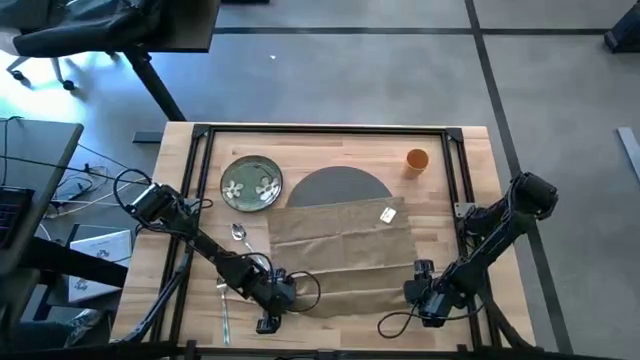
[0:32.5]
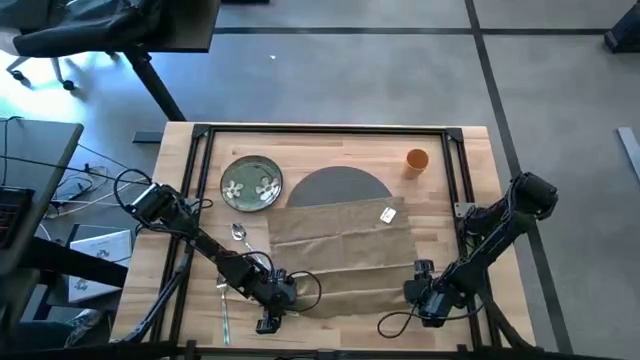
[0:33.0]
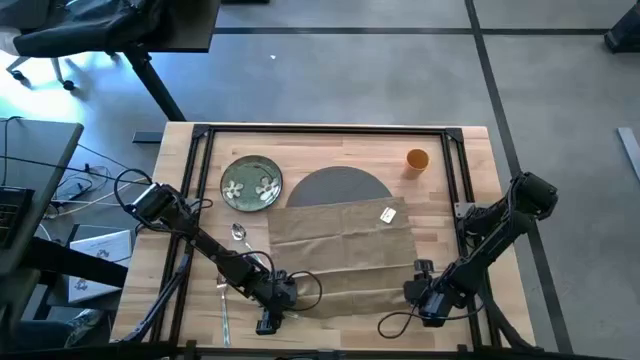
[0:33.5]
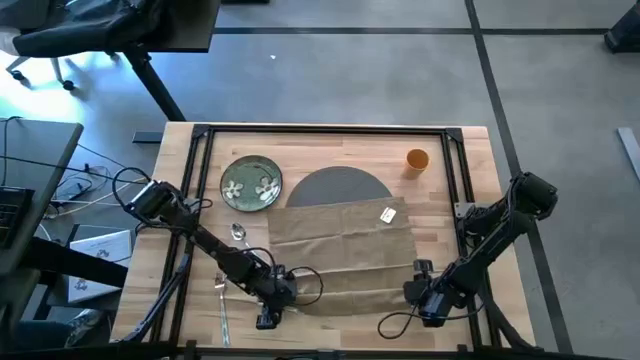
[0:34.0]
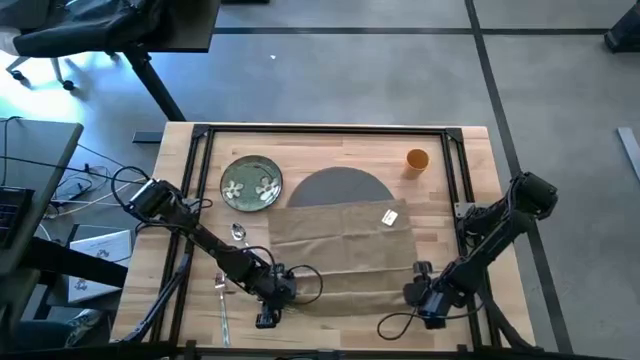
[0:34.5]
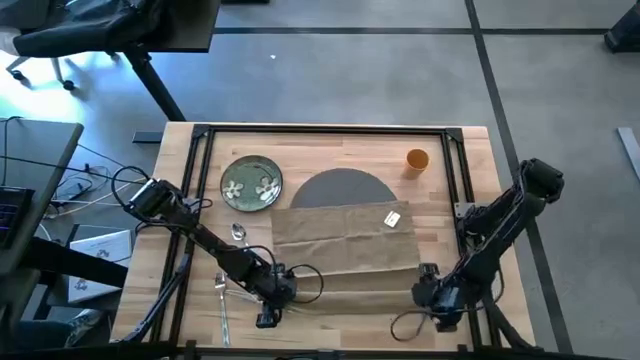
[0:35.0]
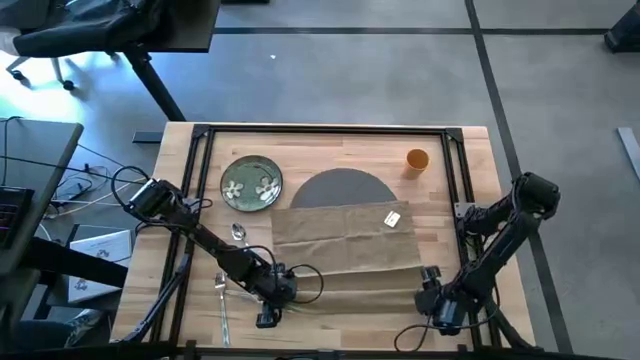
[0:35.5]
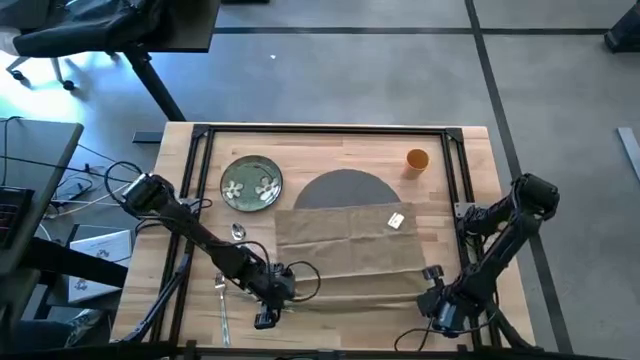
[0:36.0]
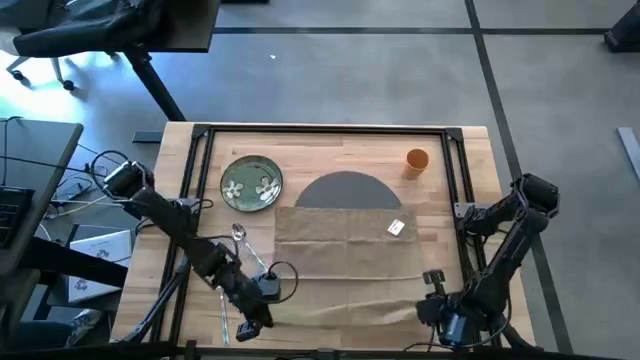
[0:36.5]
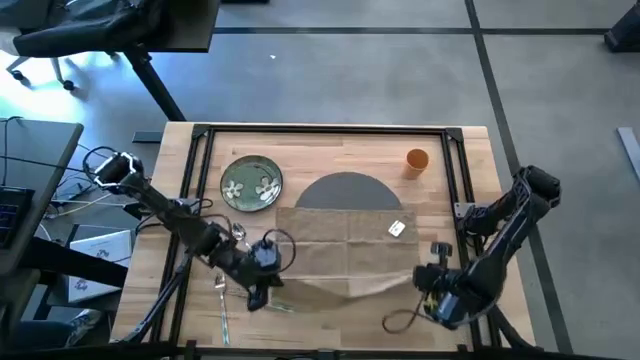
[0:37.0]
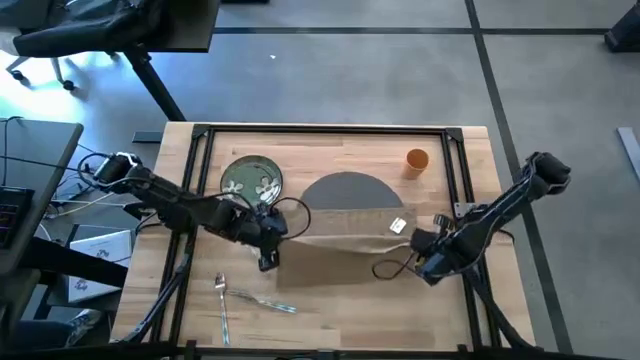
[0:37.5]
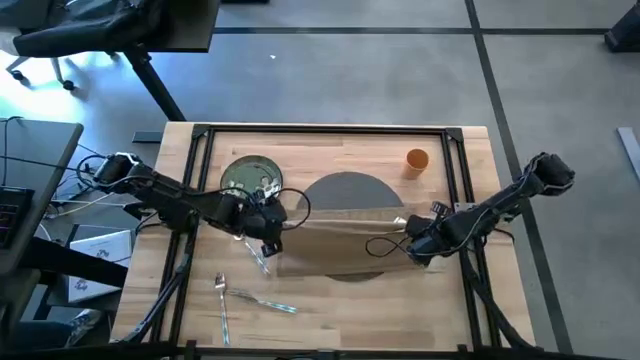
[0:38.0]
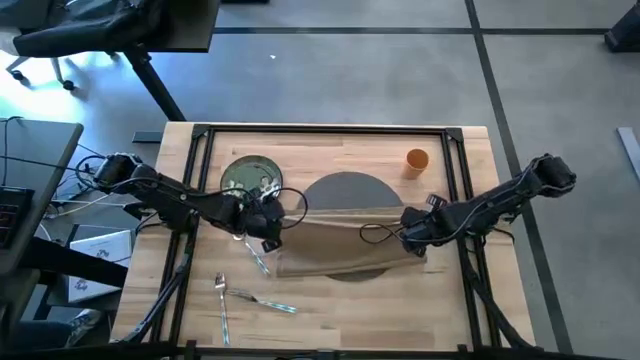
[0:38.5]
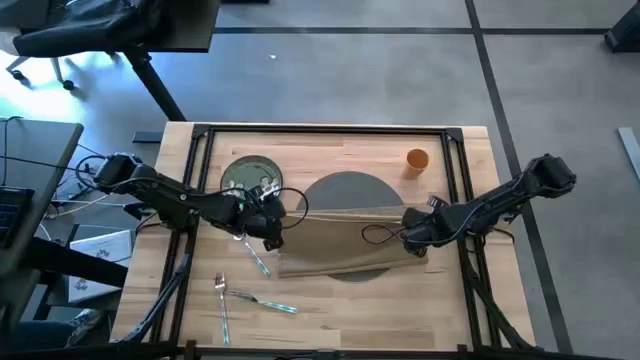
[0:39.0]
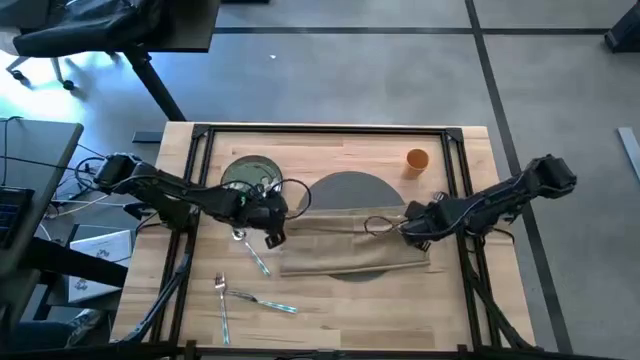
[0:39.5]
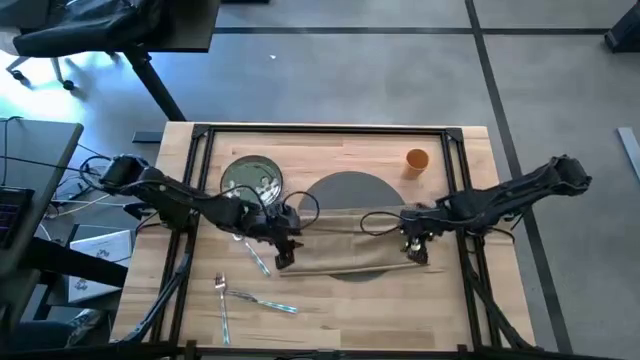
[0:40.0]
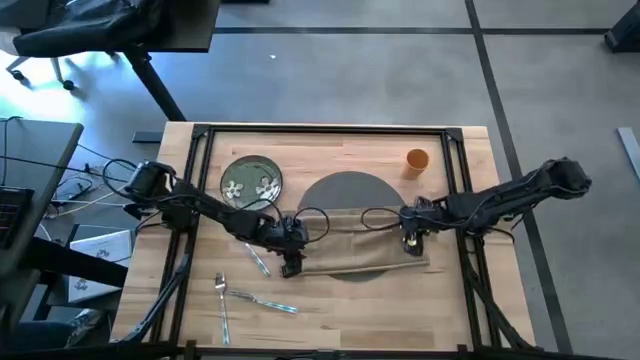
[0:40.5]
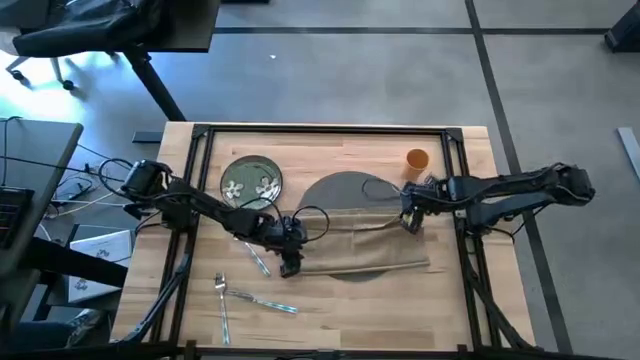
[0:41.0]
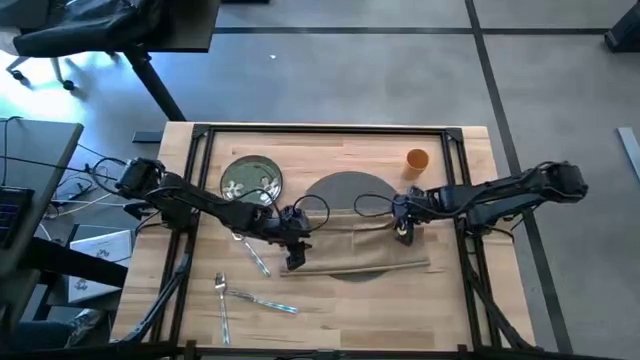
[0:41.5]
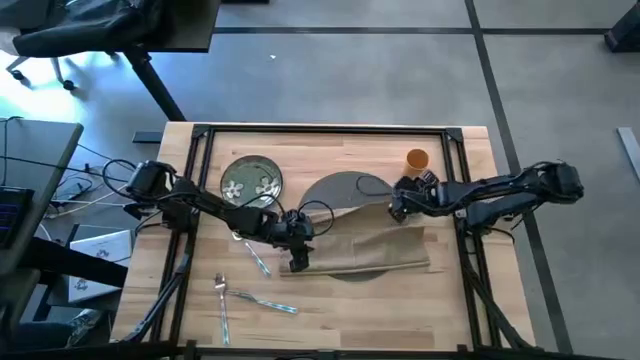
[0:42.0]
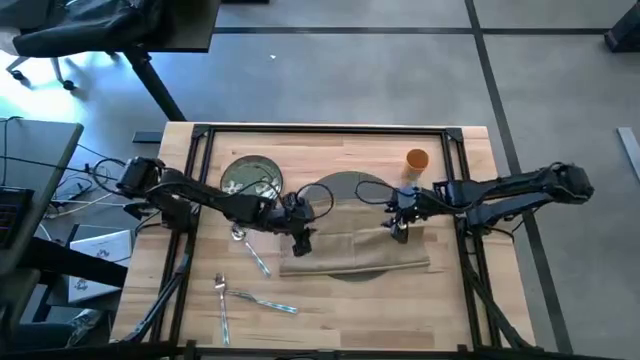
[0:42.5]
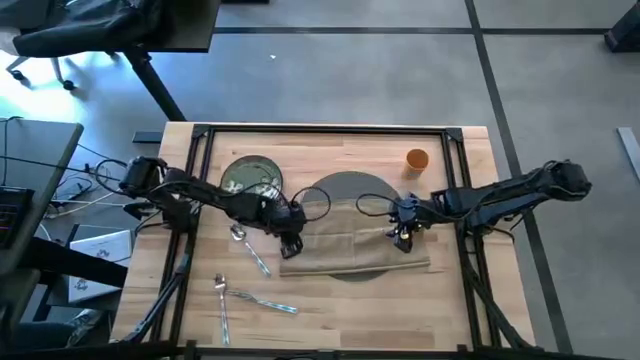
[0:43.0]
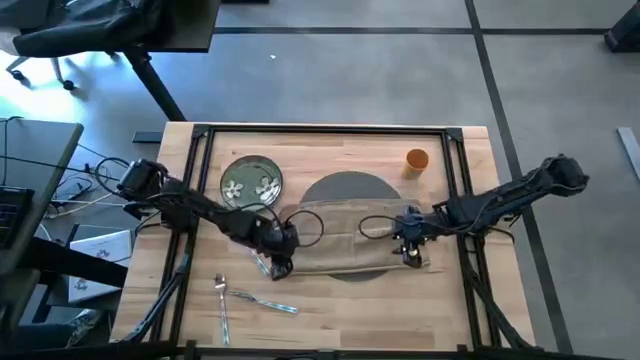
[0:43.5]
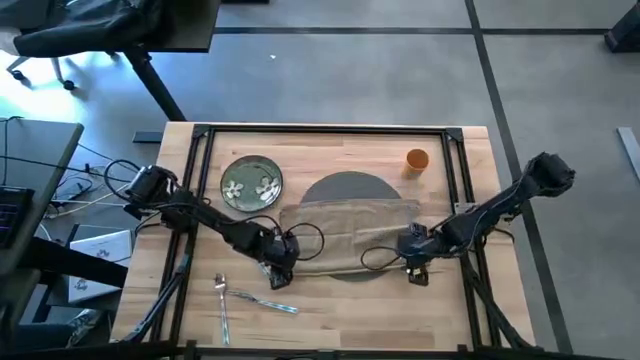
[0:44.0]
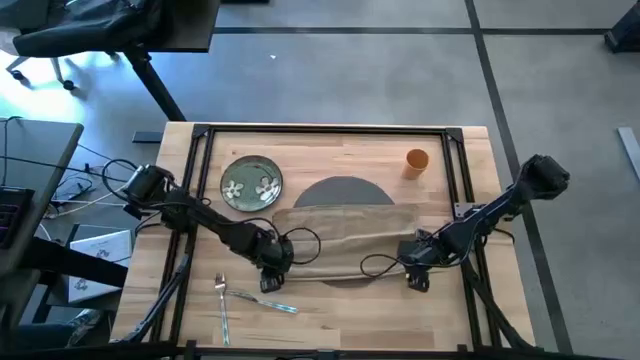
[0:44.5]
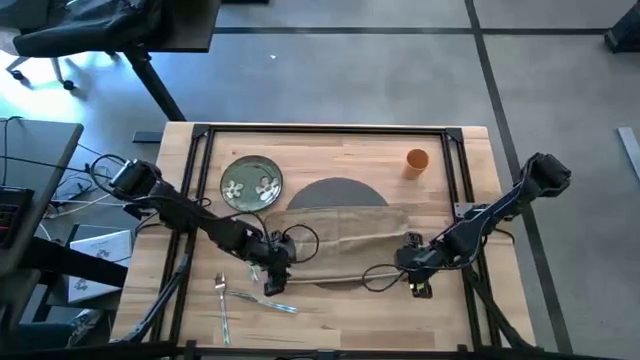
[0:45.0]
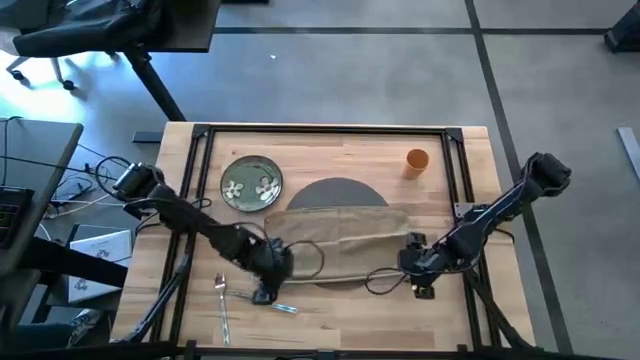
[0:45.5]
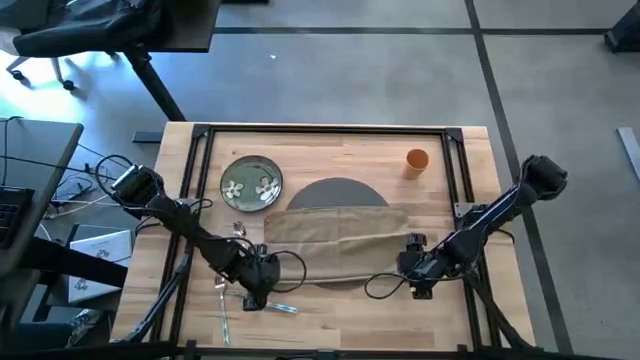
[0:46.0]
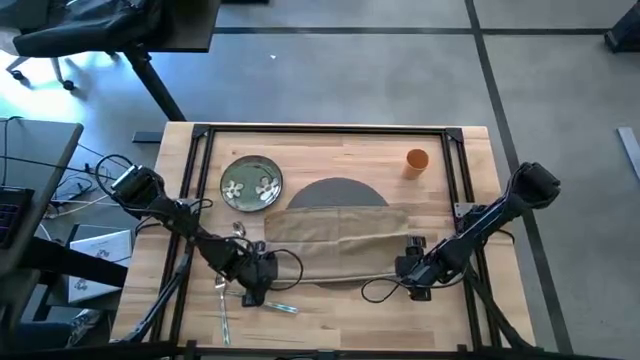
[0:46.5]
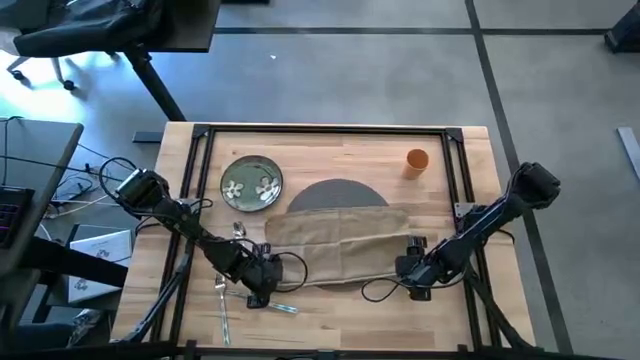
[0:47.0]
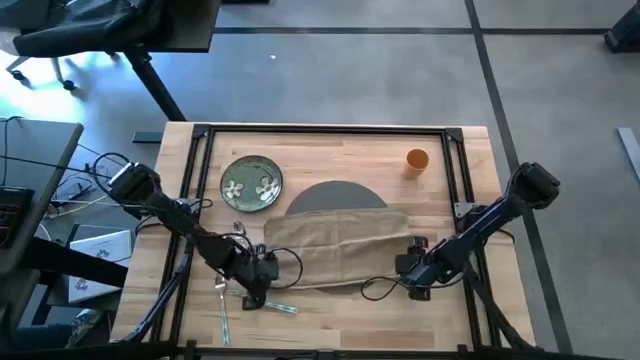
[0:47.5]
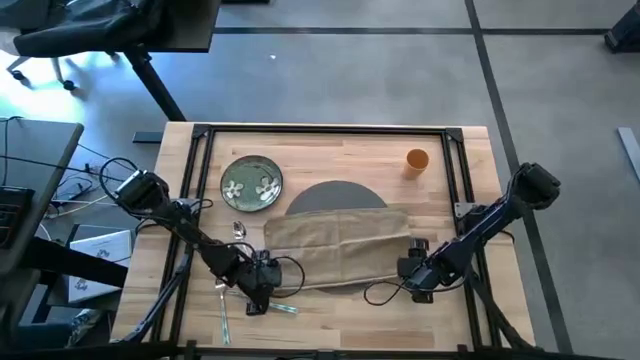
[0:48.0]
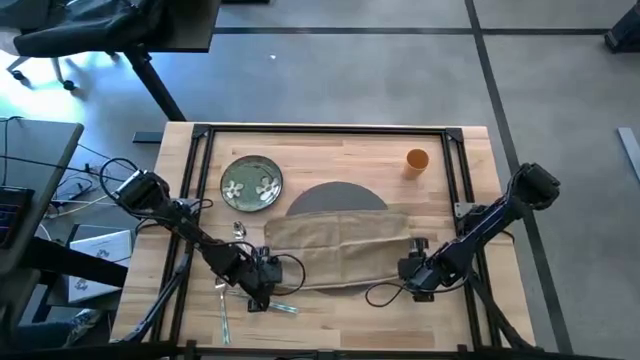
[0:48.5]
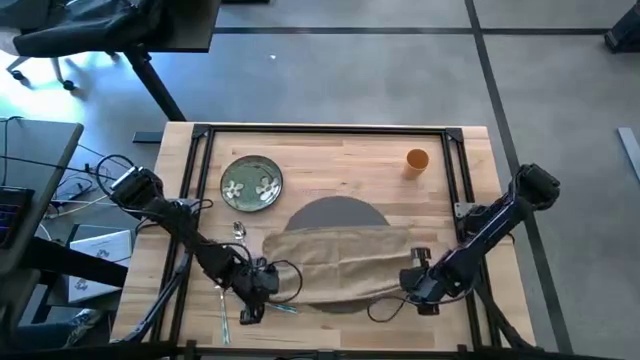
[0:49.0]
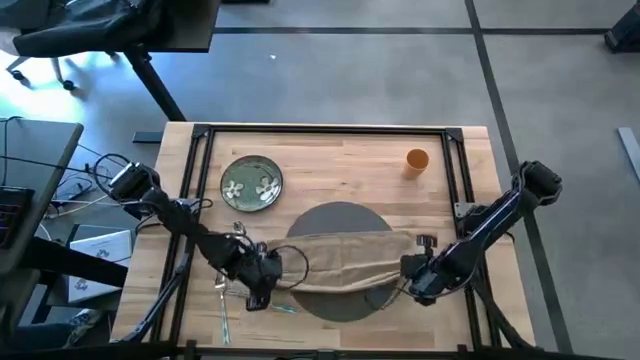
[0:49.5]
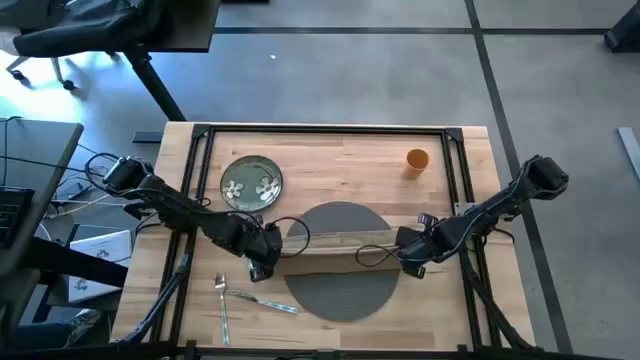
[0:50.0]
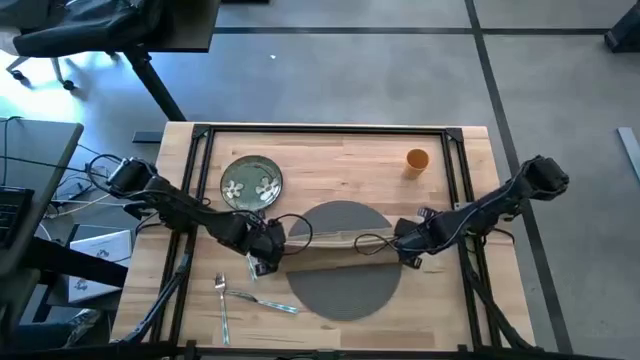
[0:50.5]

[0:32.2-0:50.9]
Task: Set table place
Fold the brown table napkin

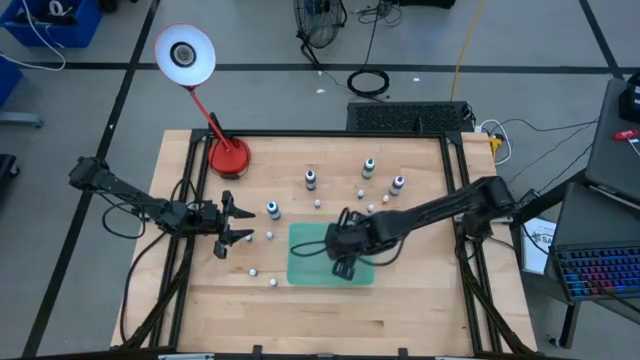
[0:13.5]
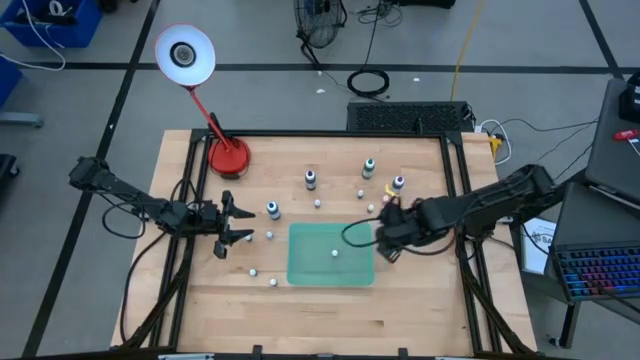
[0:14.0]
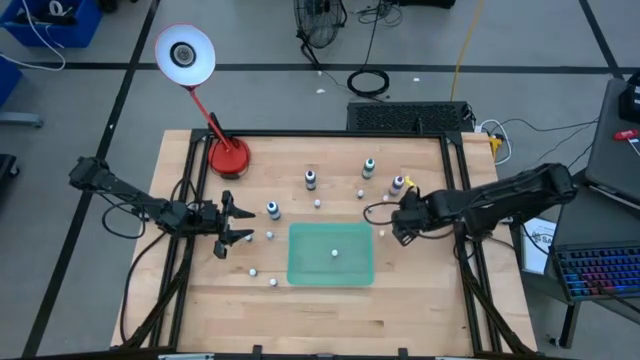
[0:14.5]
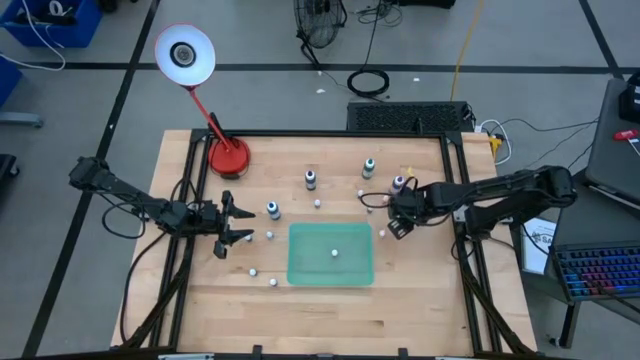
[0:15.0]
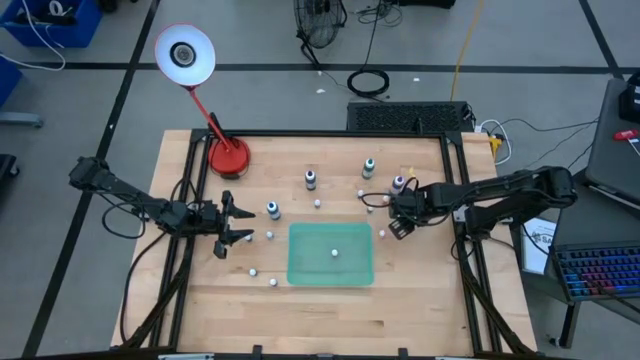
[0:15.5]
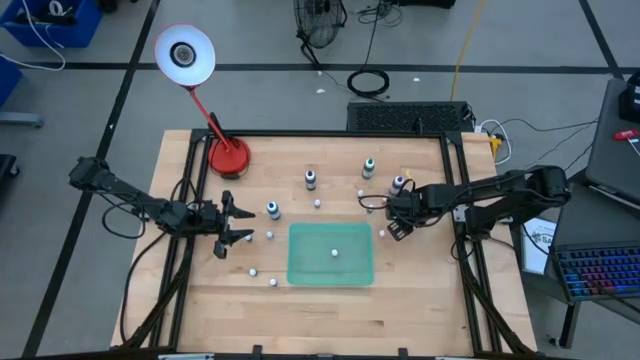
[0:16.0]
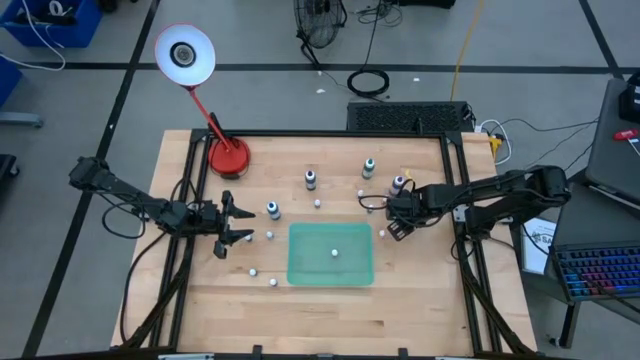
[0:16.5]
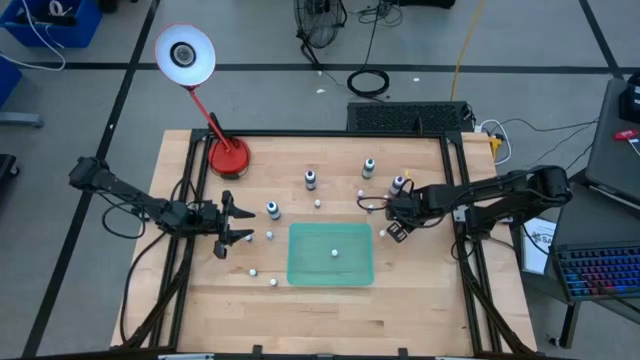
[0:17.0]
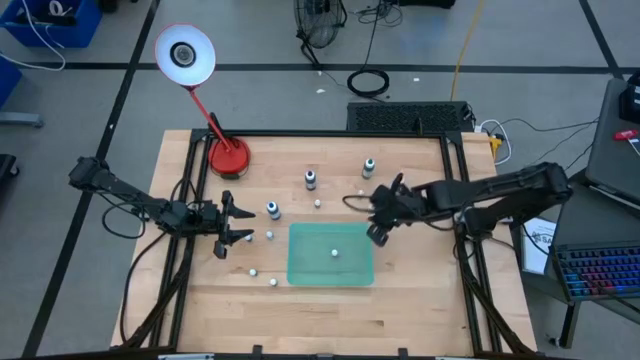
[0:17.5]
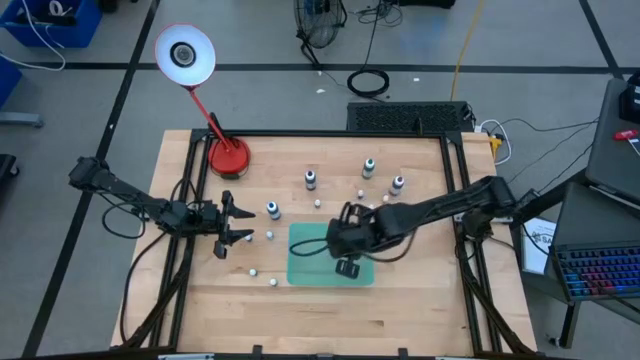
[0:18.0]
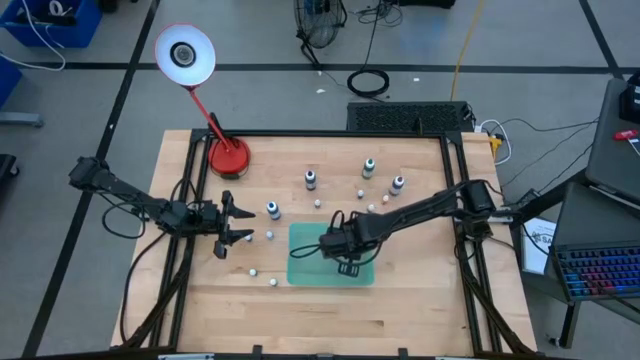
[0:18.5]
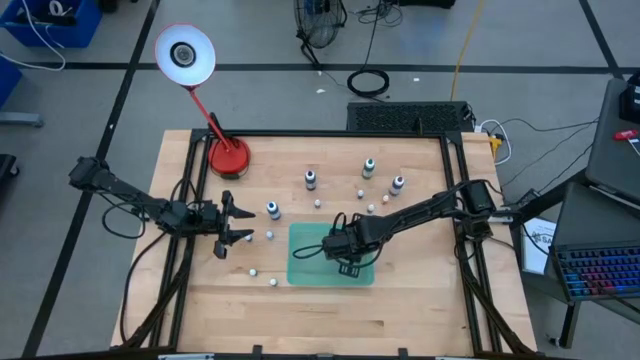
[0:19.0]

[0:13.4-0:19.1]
Task: Pick & Place food coloring
Put the small yellow food coloring bottle into the green bin
